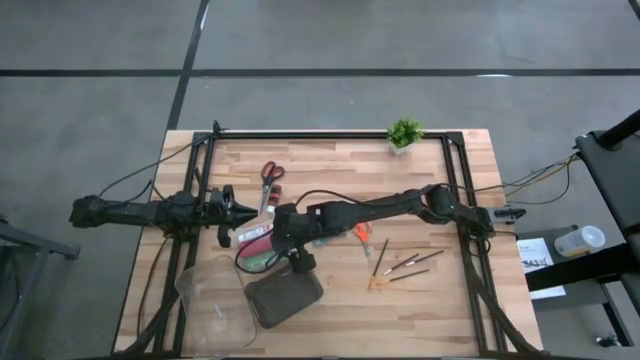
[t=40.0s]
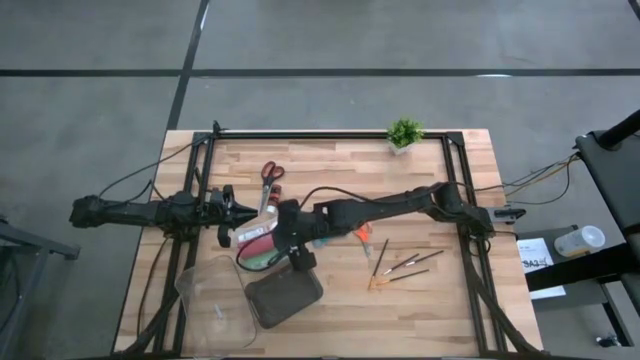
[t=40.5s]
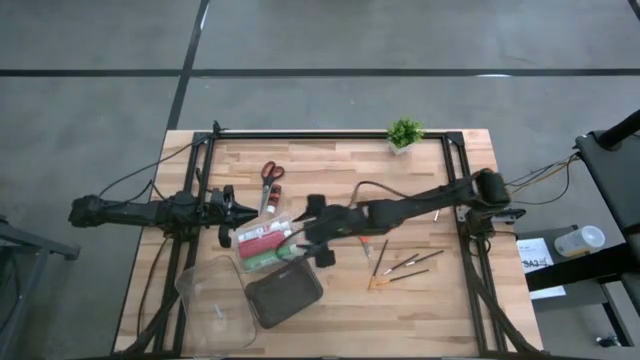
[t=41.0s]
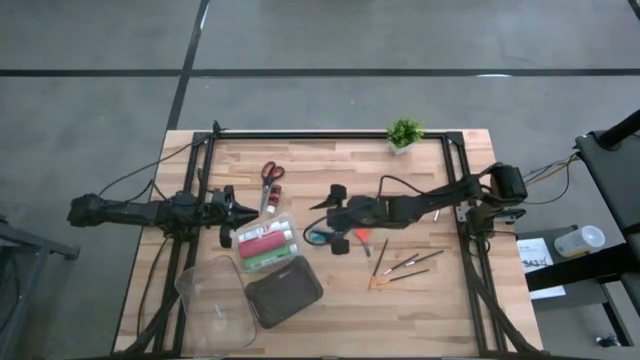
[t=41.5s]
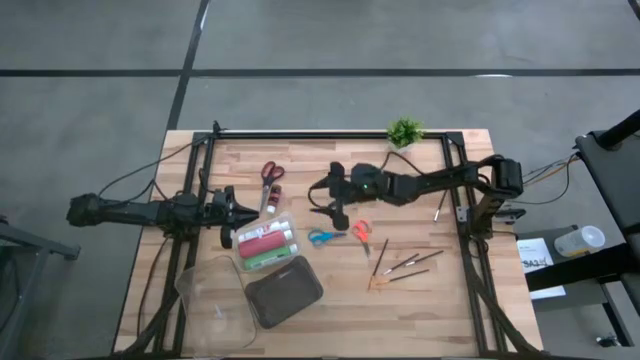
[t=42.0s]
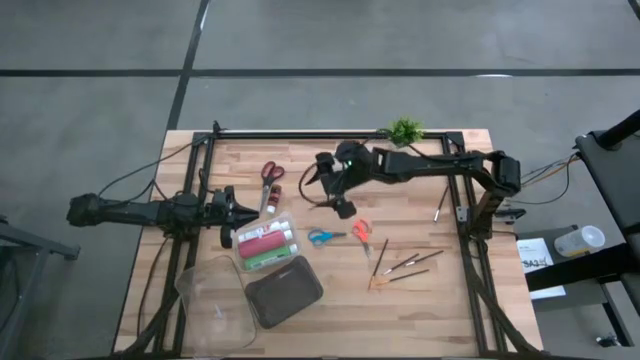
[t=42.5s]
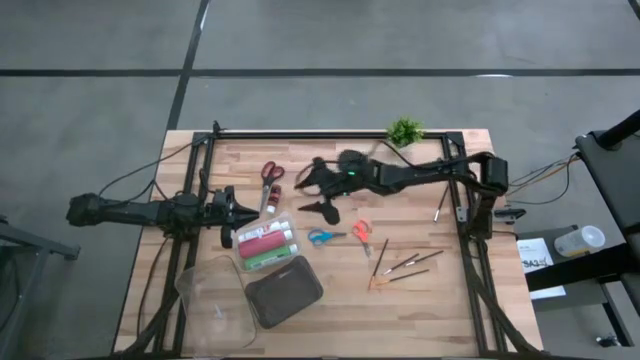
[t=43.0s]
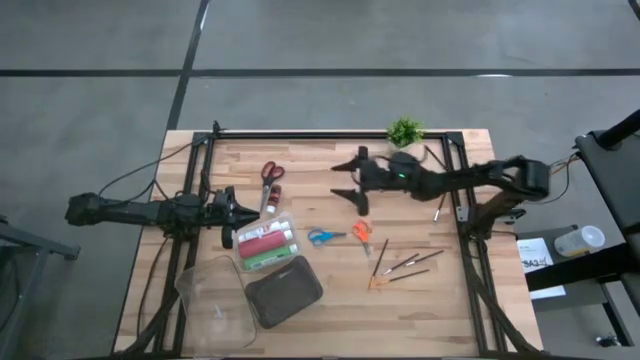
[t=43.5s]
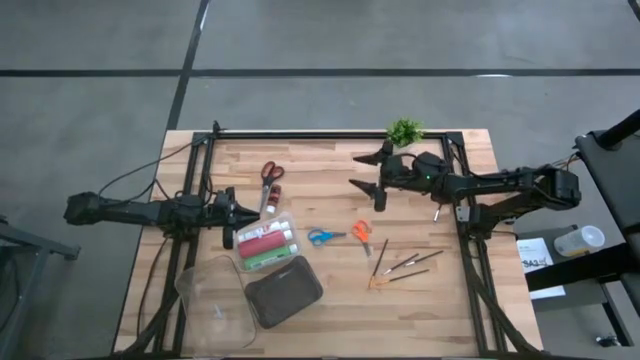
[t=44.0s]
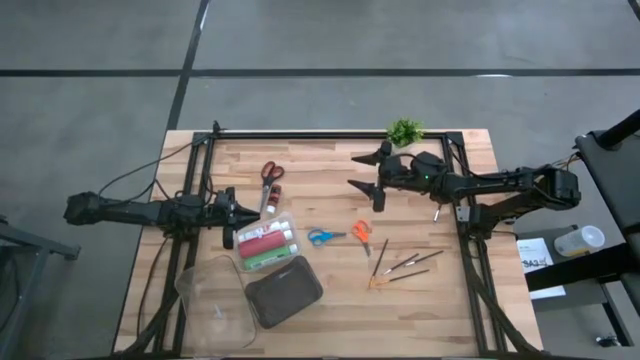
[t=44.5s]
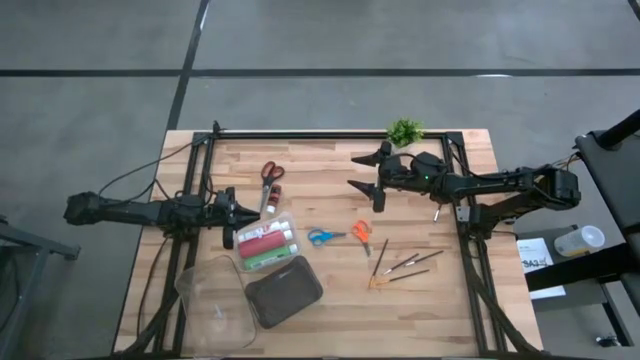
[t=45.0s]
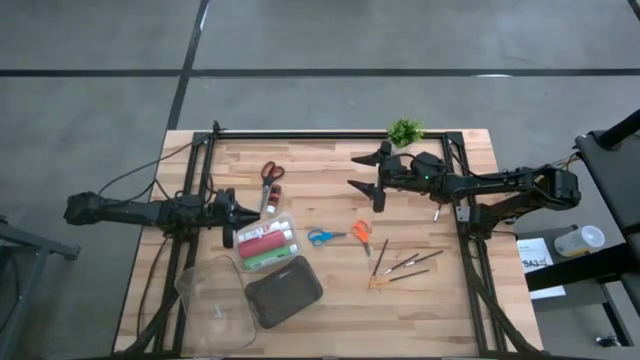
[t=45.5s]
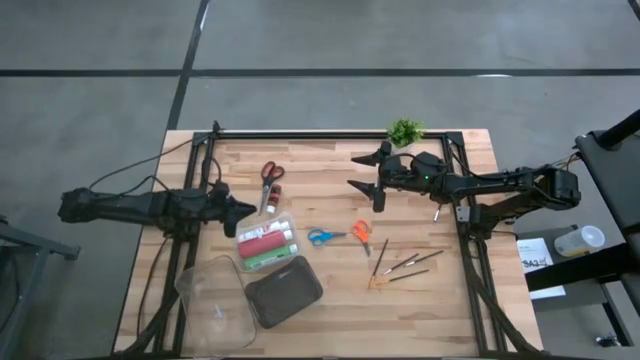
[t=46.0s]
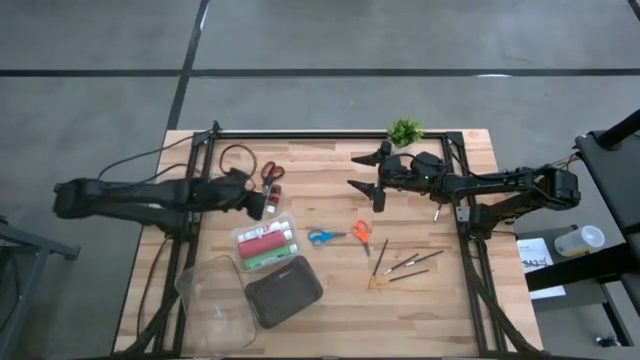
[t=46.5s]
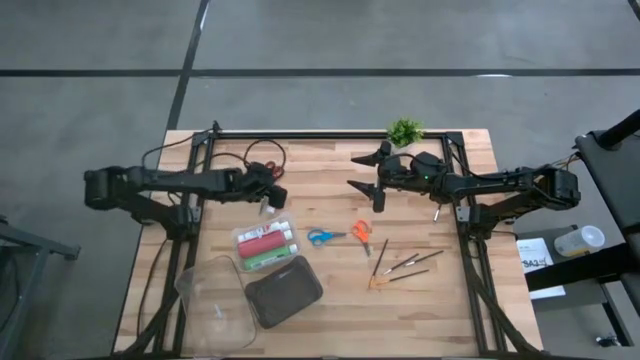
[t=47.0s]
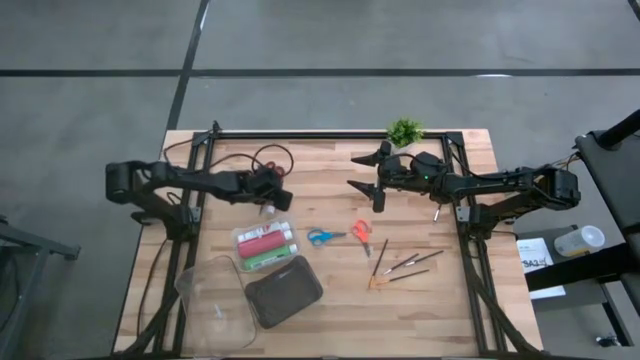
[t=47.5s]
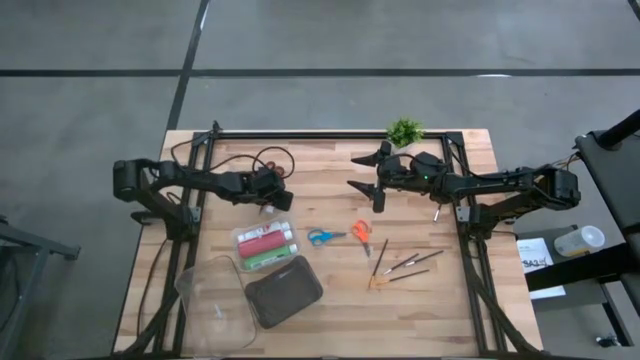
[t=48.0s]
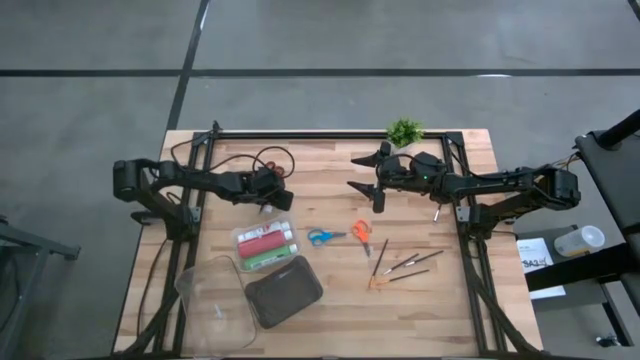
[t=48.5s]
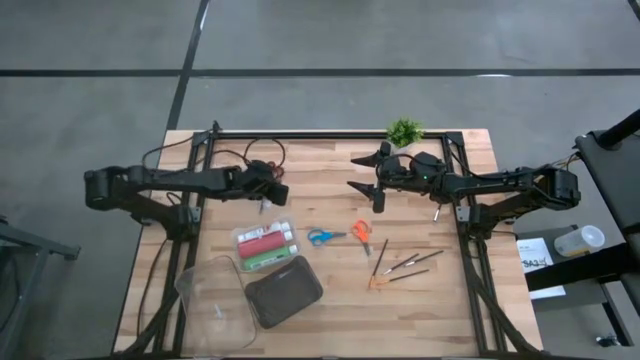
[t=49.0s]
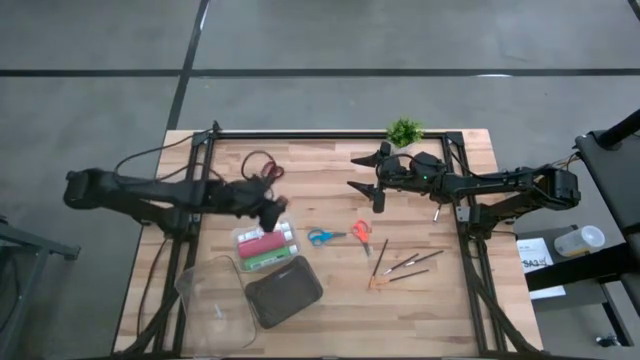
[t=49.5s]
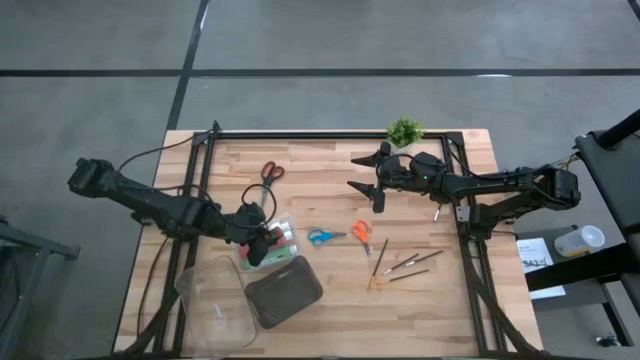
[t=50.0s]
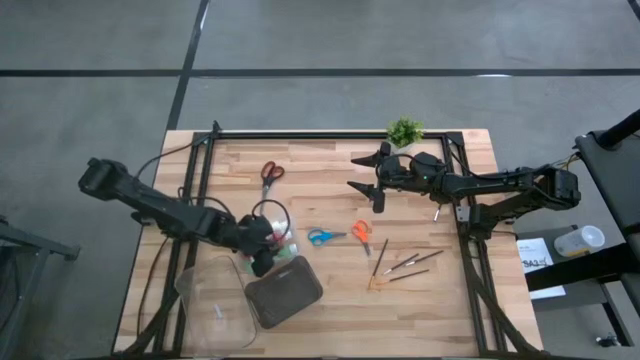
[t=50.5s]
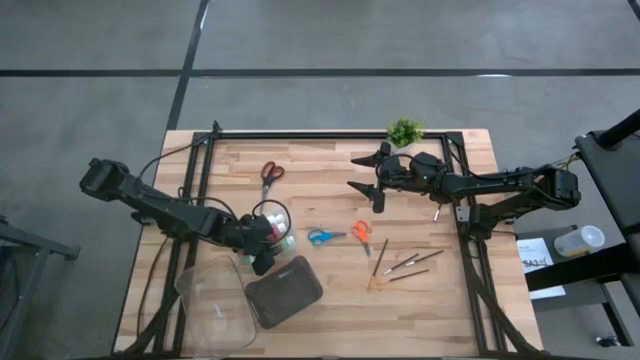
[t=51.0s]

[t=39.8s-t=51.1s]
Task: Pick & Place Paint Supplies
Put the brown paint bottle into the top transparent bin

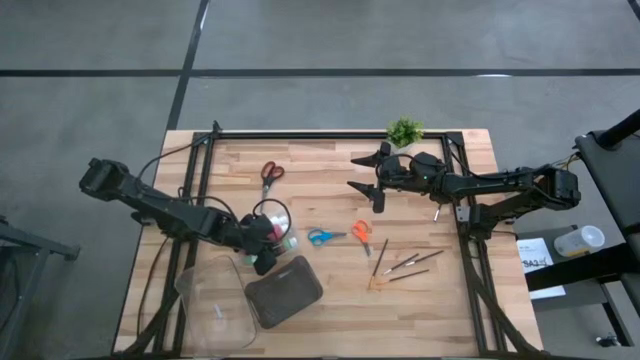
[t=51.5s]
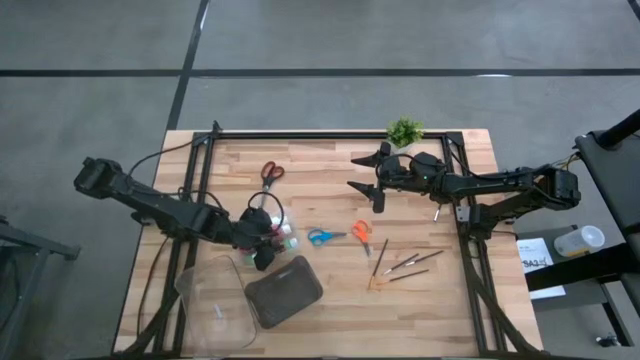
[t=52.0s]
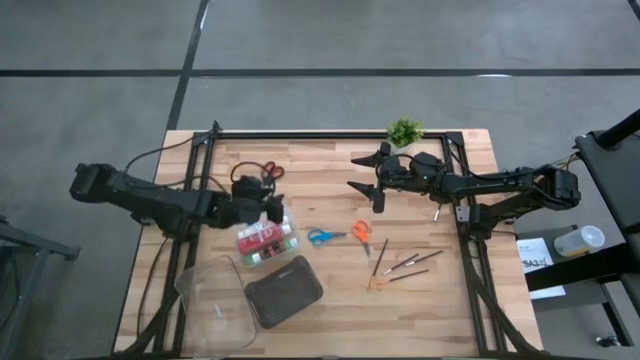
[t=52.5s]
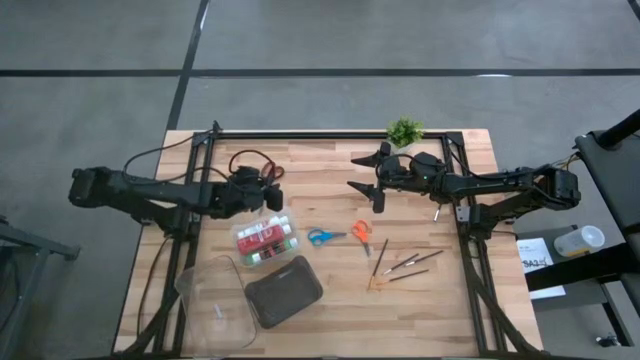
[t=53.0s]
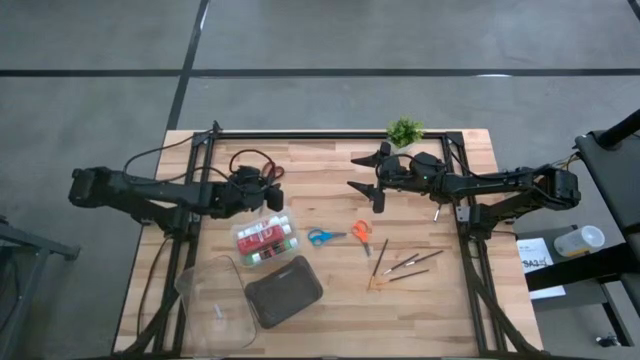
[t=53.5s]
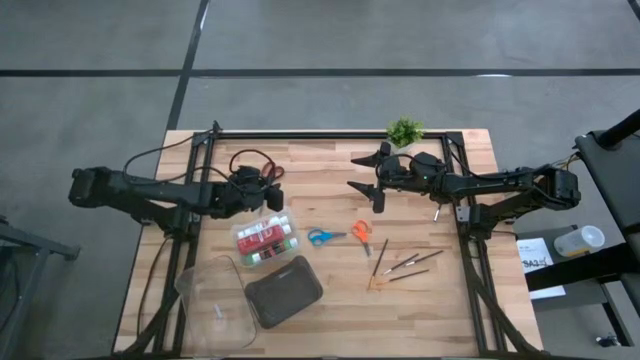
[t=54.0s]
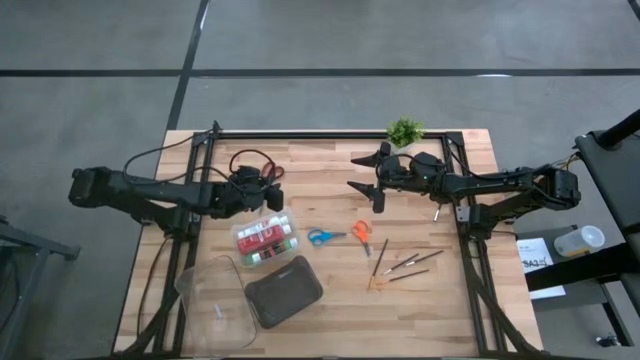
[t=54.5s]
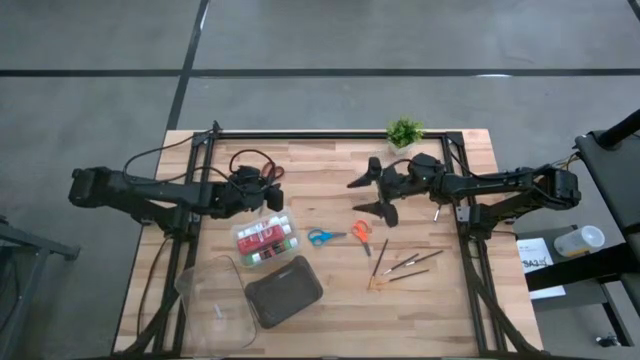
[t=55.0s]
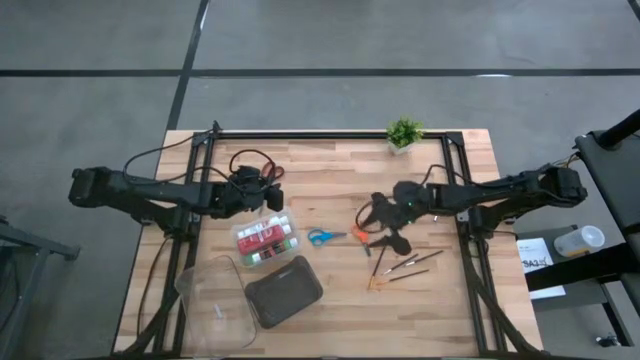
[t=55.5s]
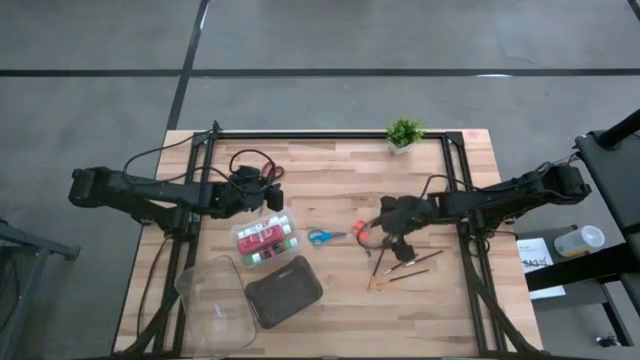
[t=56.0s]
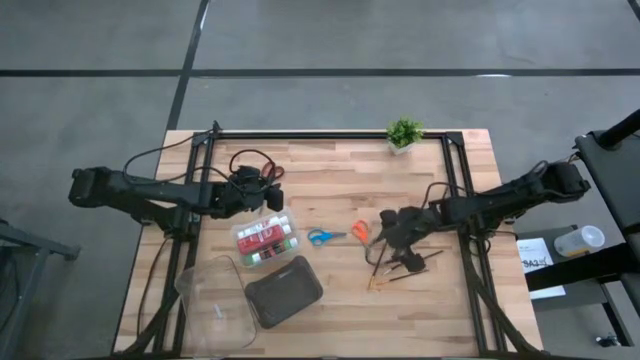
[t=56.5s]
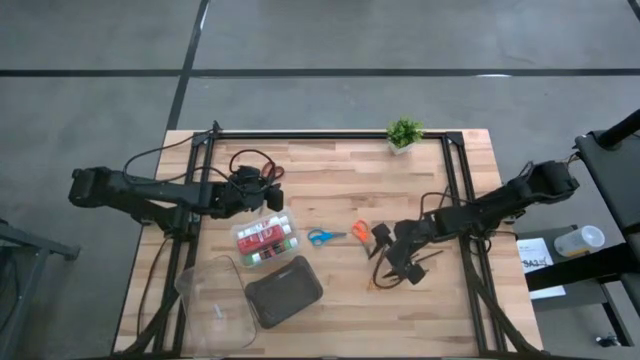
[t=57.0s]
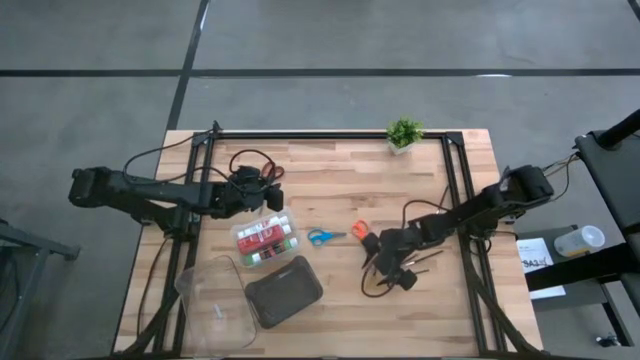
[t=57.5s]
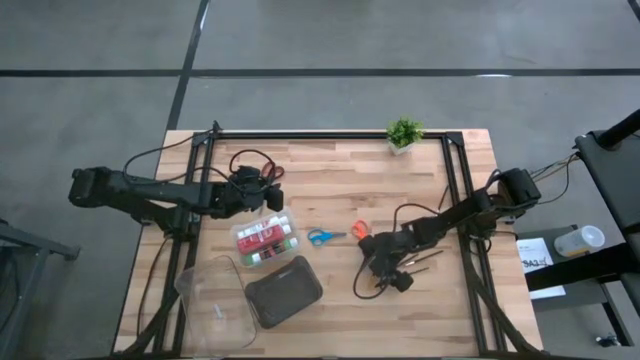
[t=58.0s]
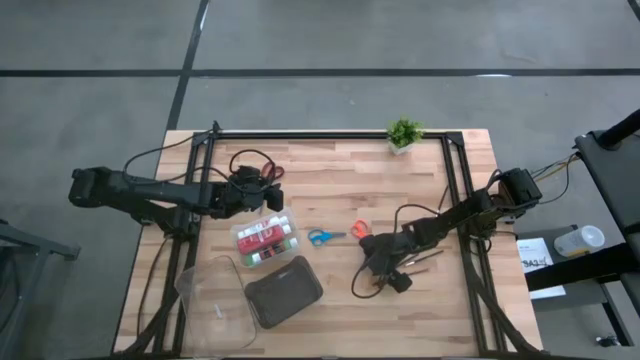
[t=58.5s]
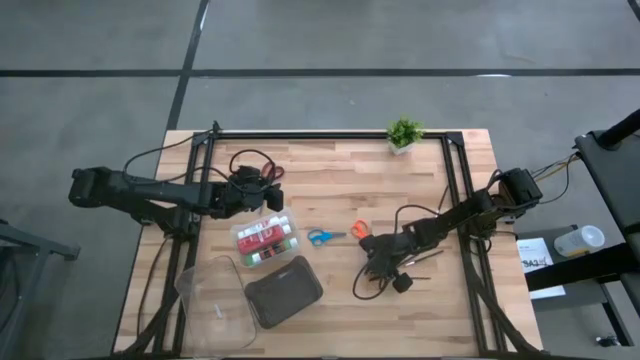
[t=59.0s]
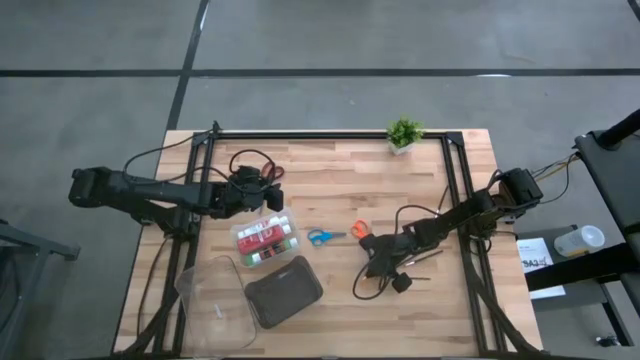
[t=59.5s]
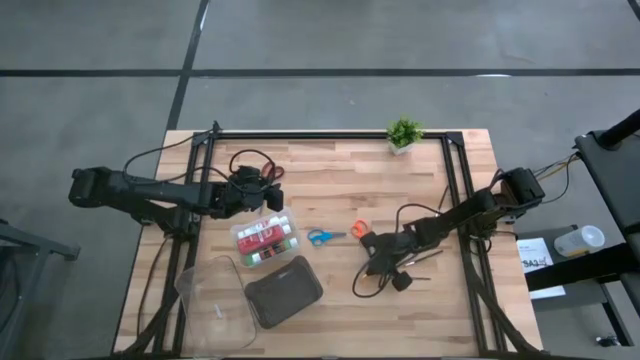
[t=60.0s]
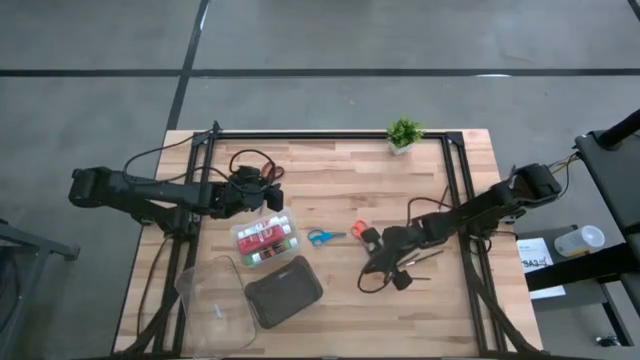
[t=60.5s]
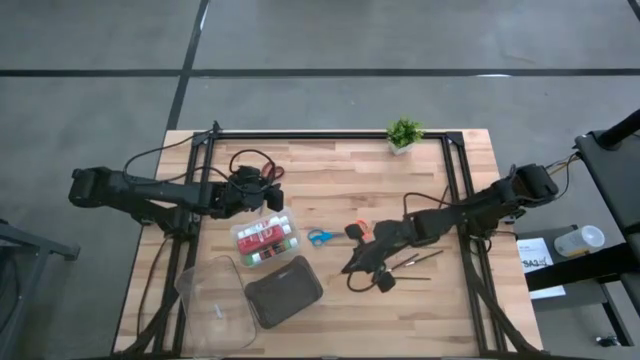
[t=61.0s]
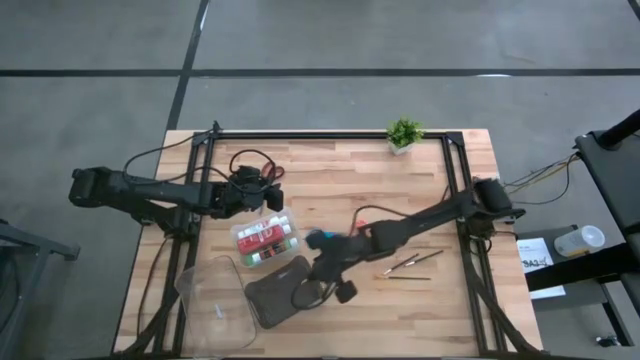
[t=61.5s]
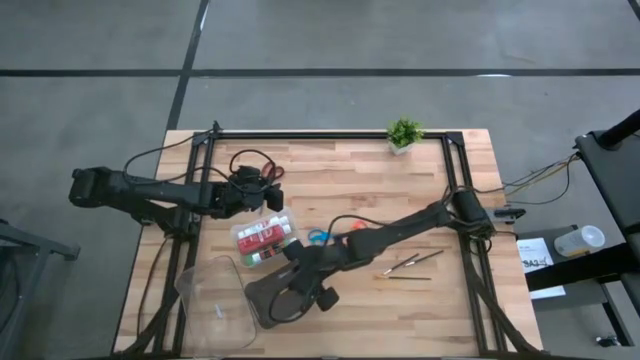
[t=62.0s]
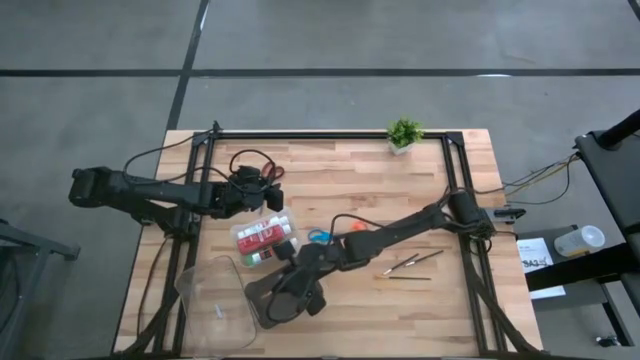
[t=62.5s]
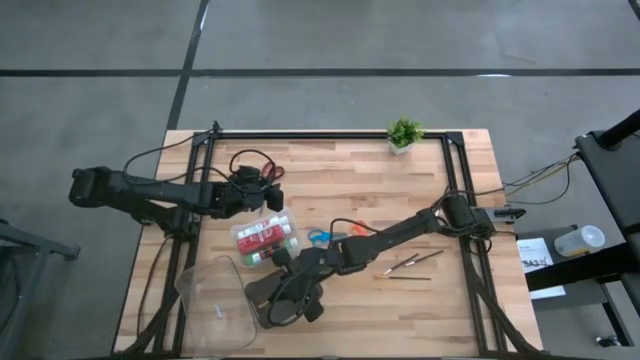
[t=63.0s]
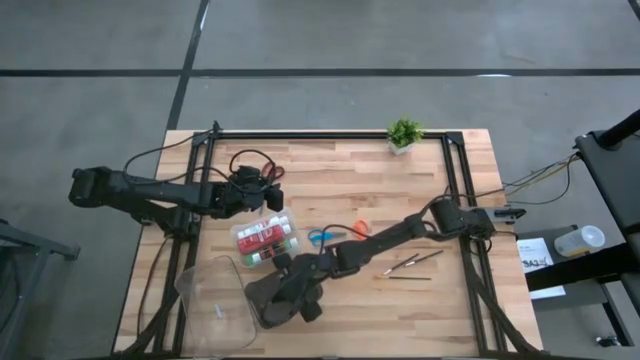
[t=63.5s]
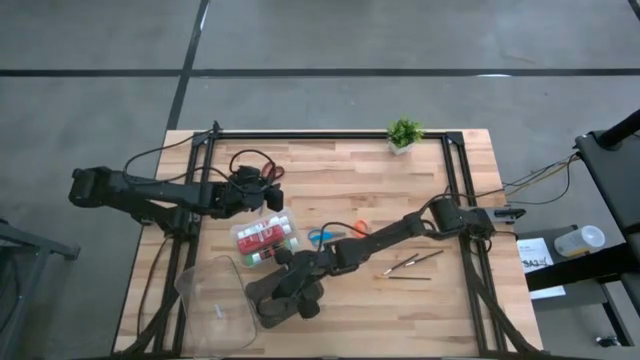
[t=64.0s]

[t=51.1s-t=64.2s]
Put the top gold paint brush into the black transparent bin
